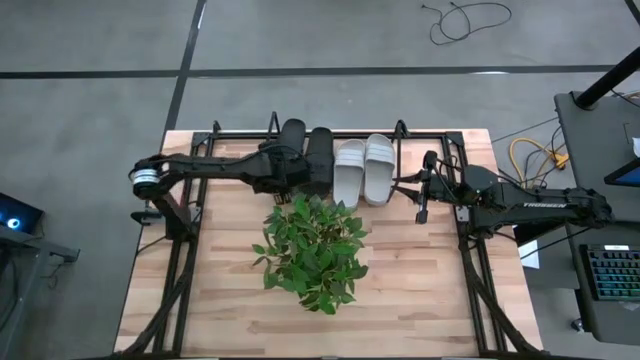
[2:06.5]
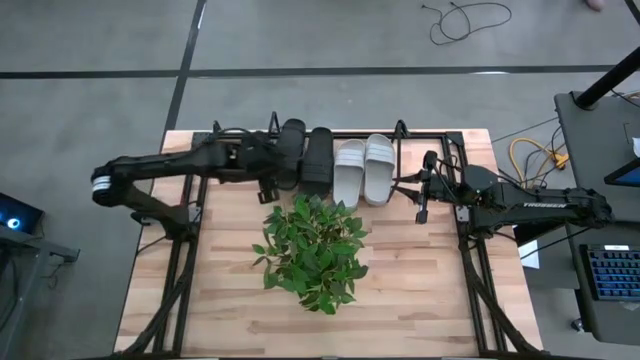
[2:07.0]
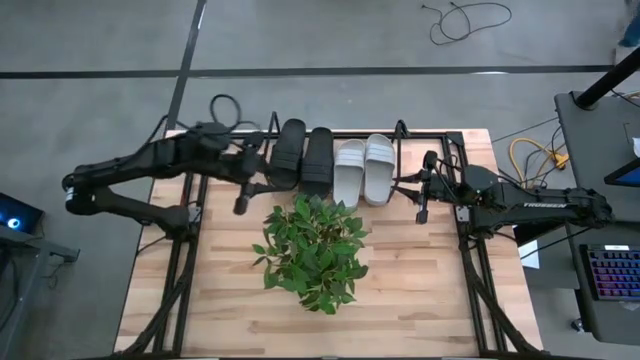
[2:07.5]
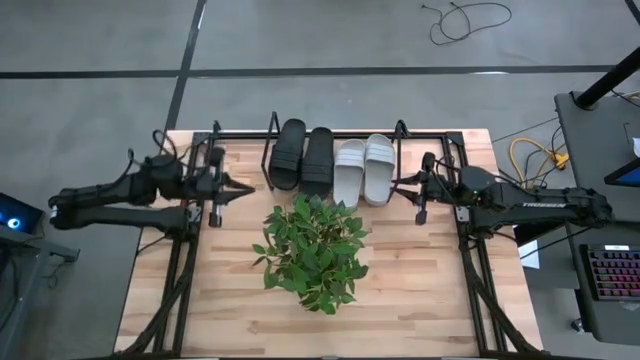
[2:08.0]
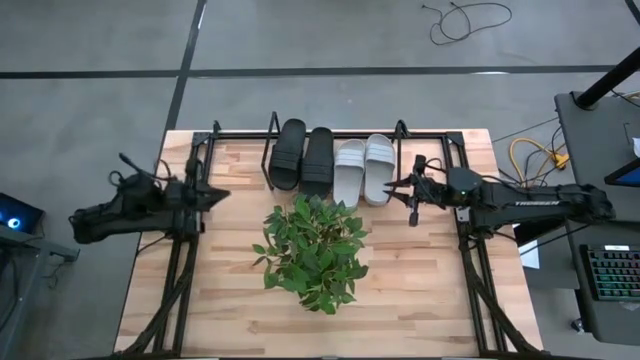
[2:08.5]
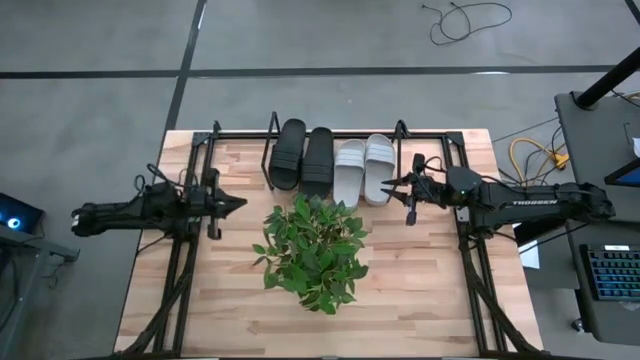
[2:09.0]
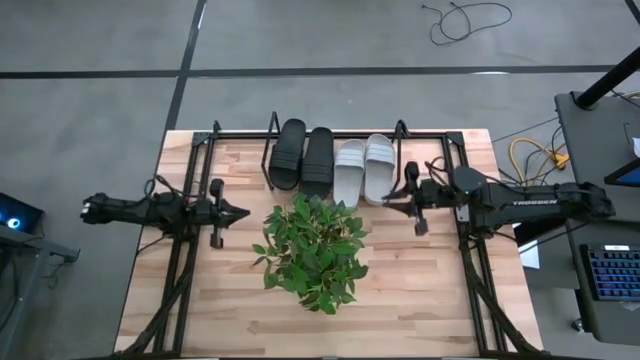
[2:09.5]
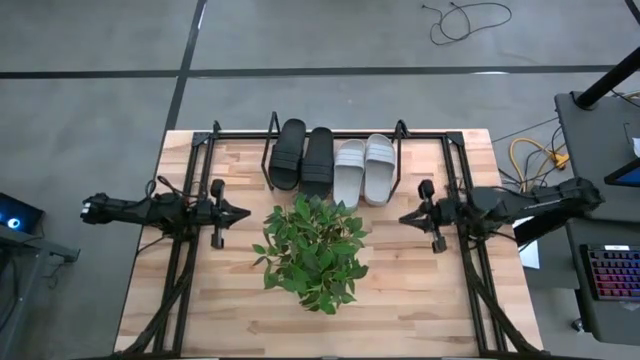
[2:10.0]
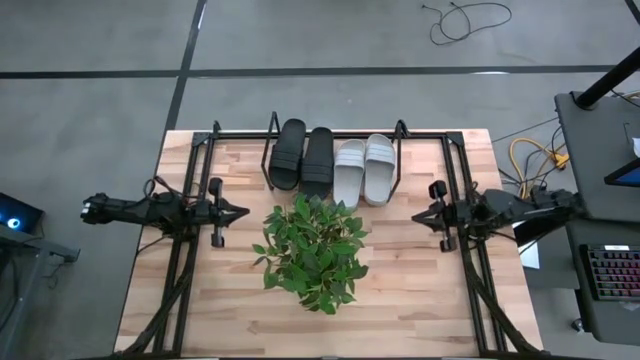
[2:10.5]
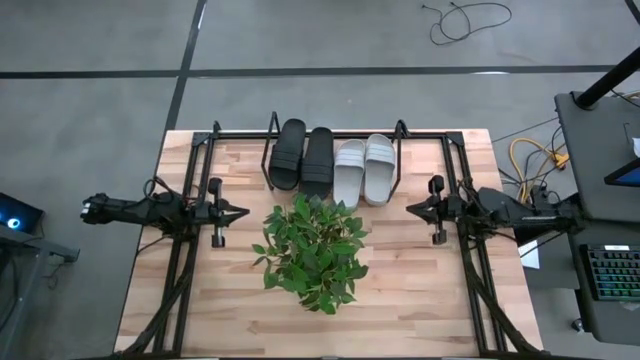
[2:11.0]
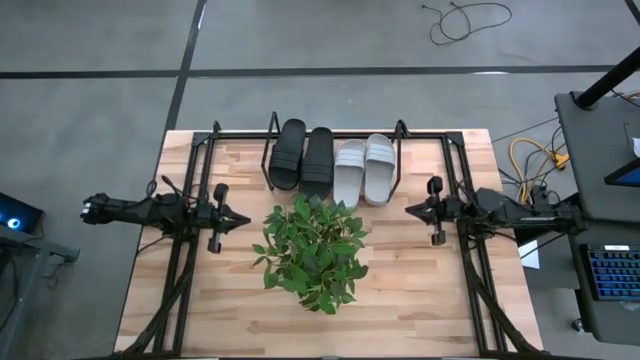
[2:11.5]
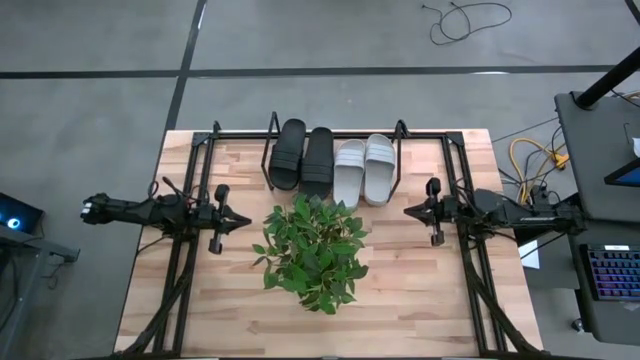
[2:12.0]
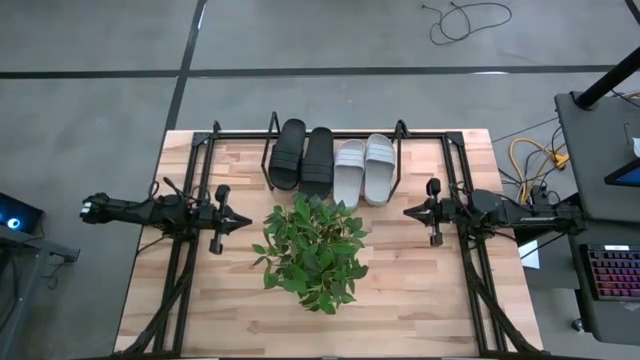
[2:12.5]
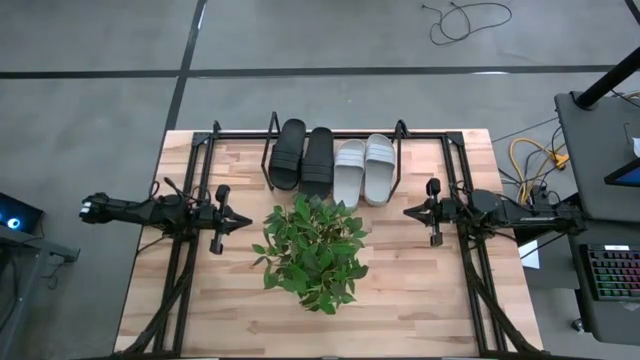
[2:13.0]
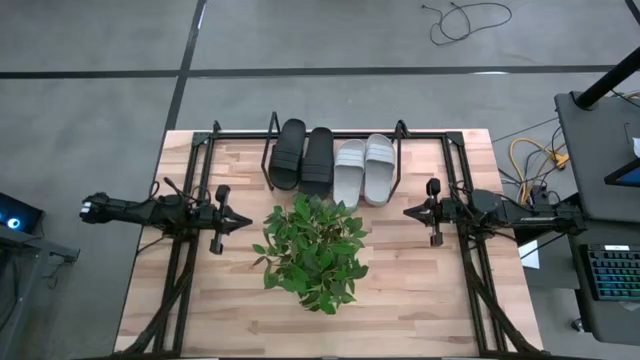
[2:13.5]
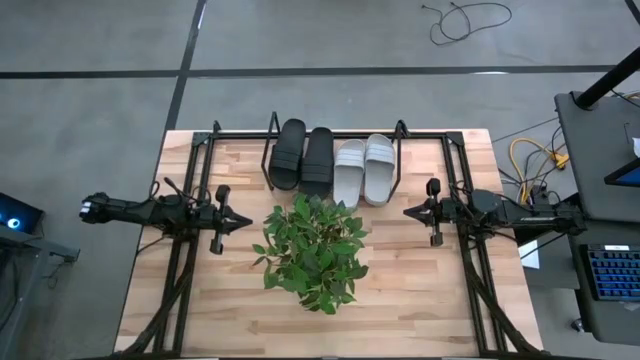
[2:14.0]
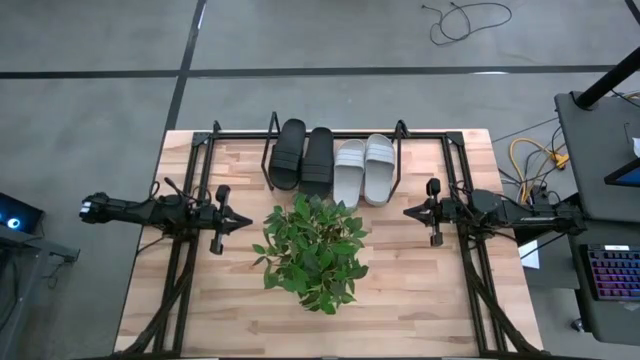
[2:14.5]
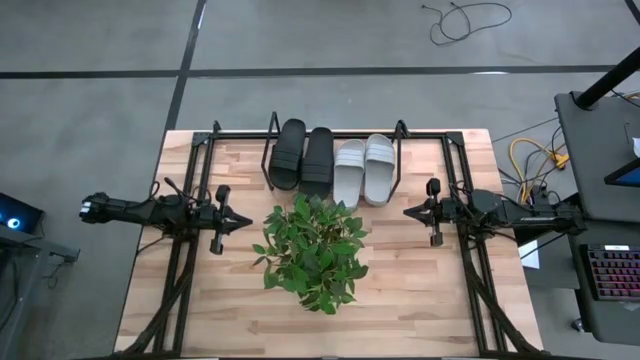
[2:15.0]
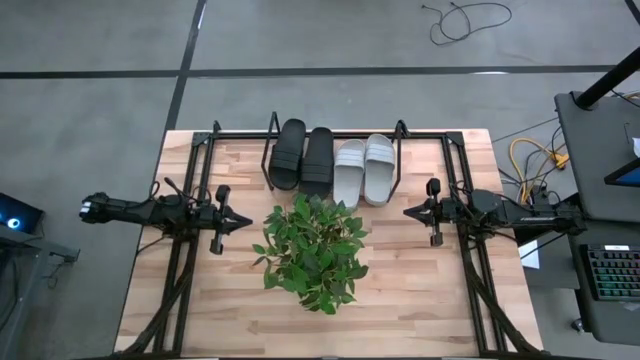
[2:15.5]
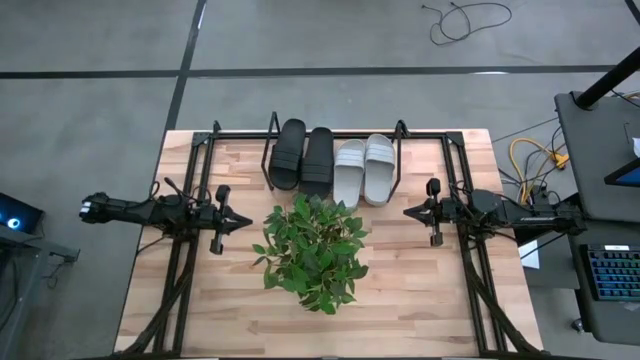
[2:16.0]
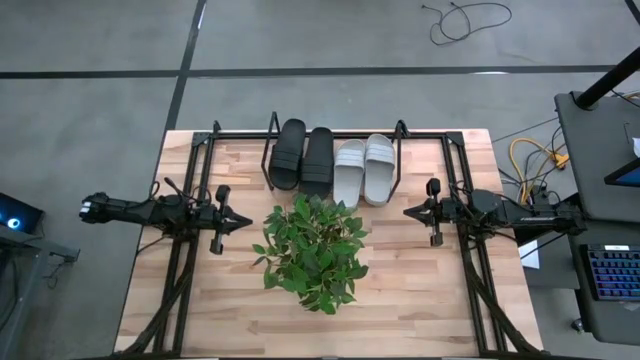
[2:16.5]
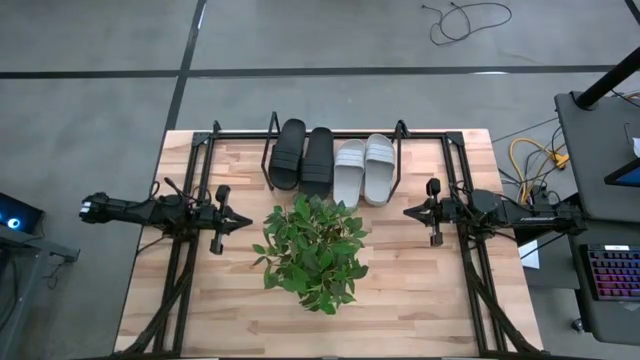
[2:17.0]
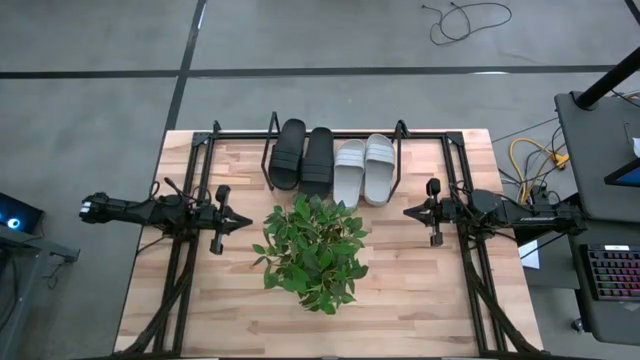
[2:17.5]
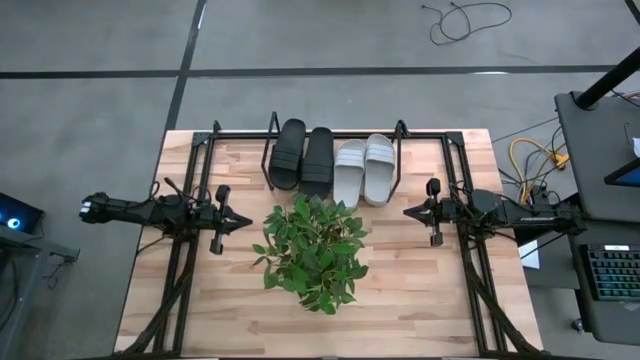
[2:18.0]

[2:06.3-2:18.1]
Task: Pick and place slides into the shelf
Return to Home Position

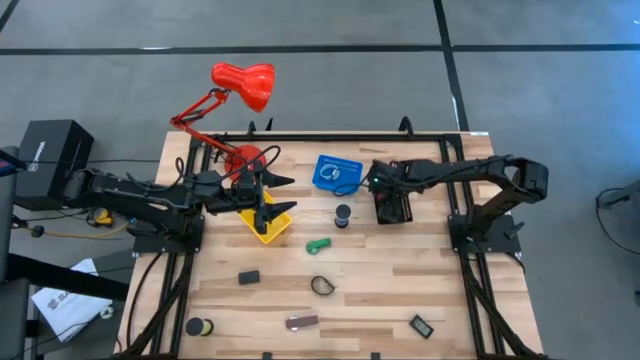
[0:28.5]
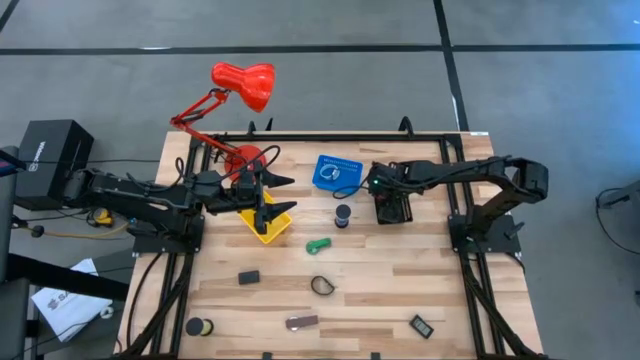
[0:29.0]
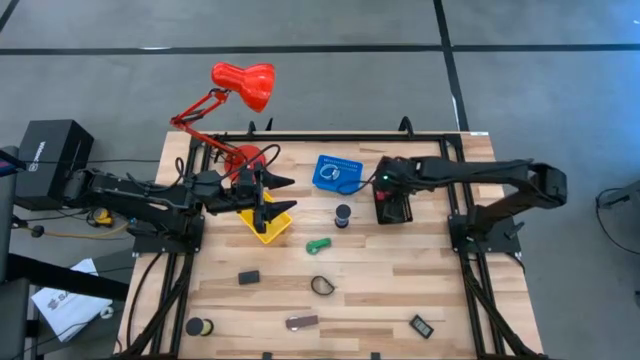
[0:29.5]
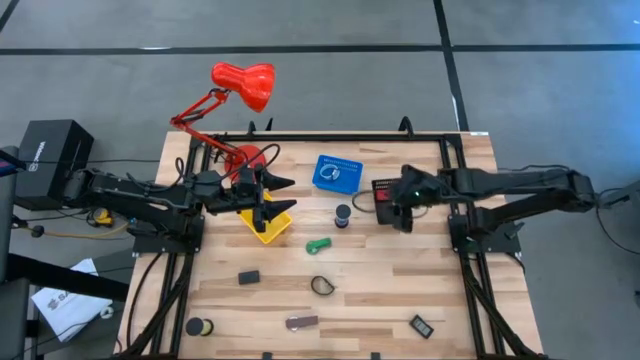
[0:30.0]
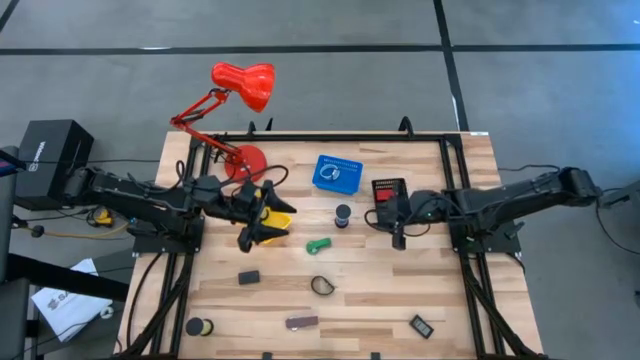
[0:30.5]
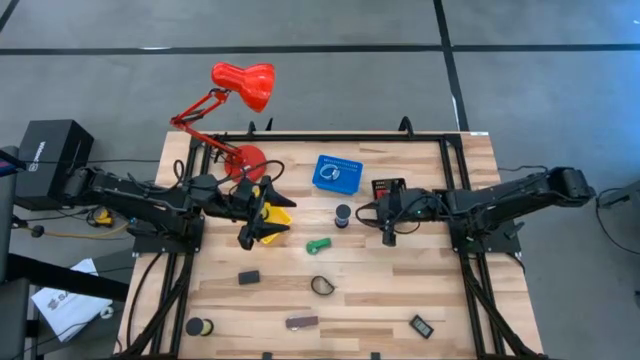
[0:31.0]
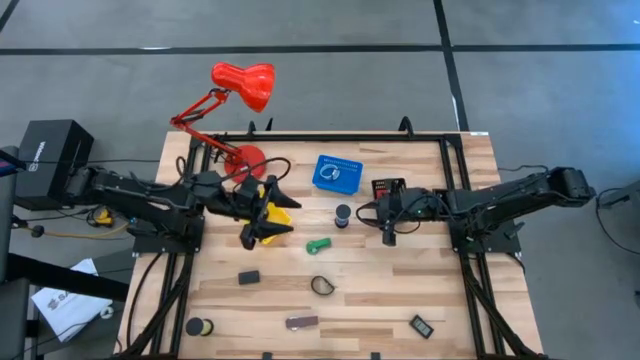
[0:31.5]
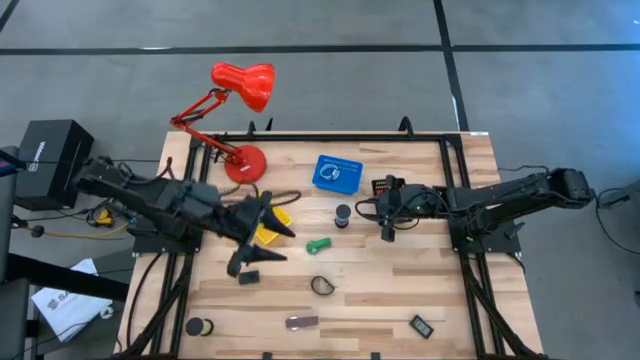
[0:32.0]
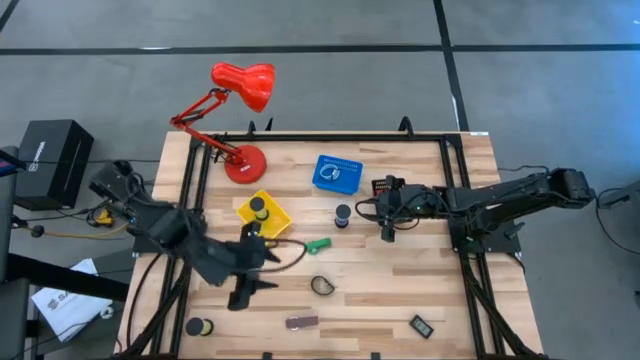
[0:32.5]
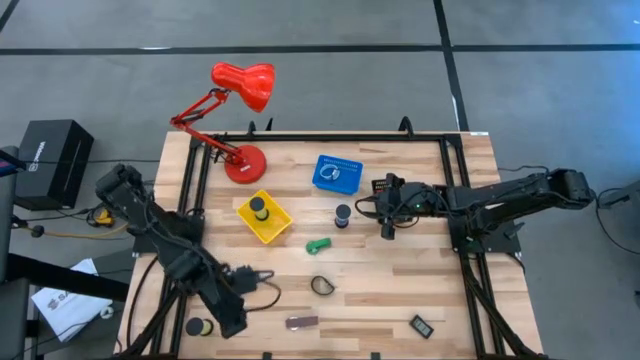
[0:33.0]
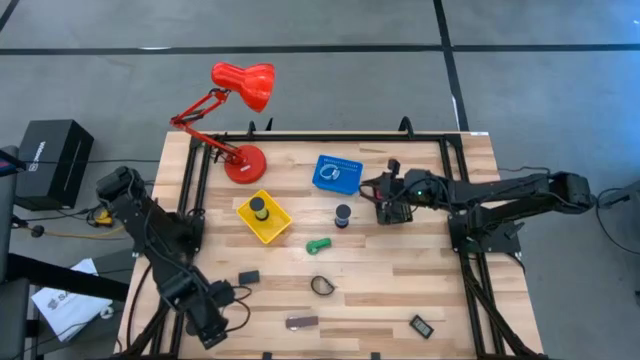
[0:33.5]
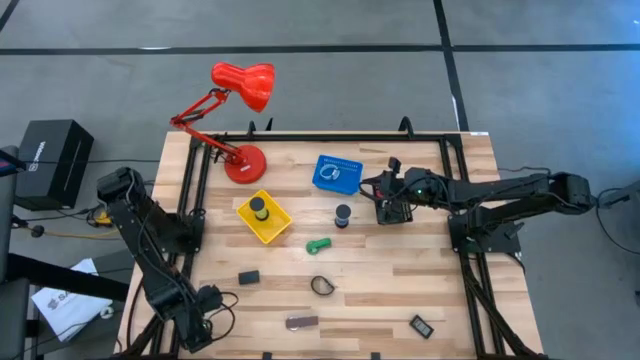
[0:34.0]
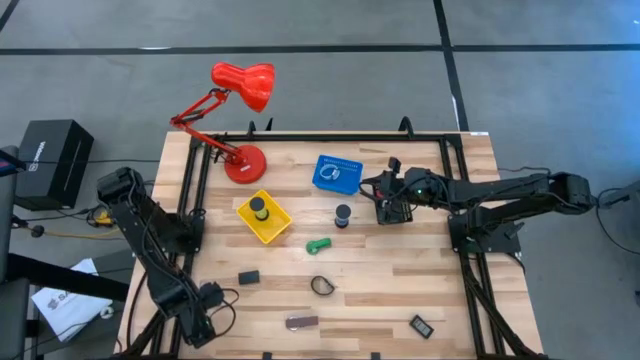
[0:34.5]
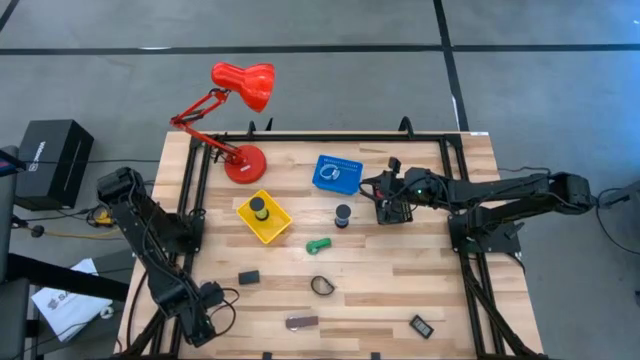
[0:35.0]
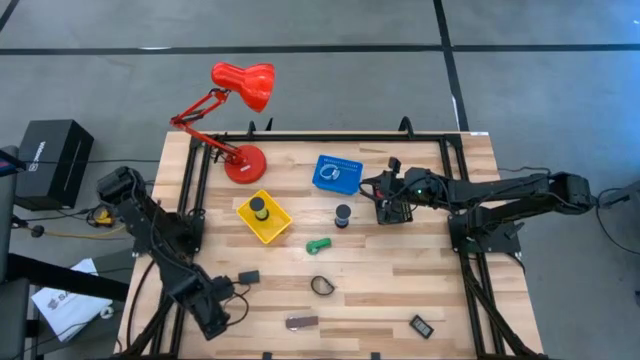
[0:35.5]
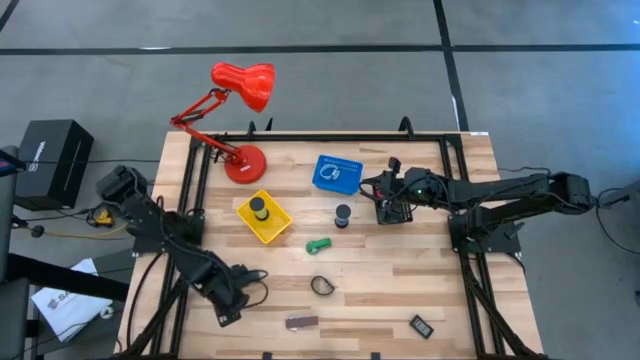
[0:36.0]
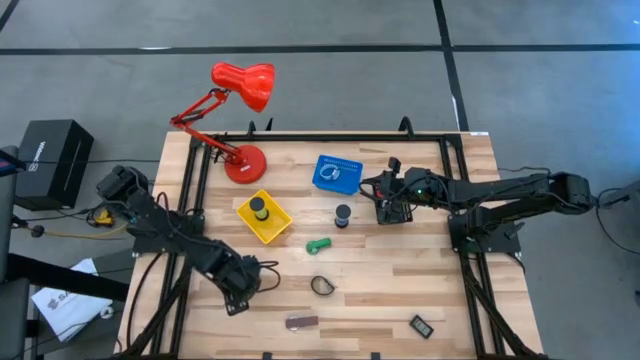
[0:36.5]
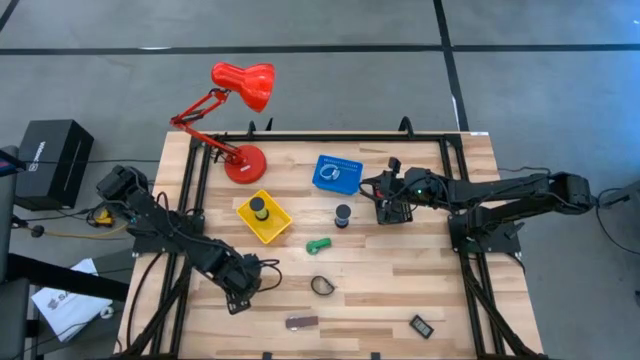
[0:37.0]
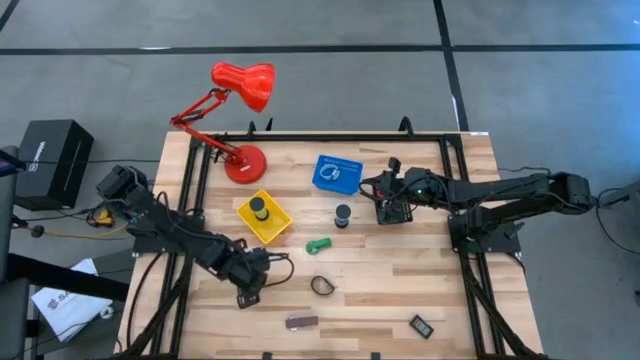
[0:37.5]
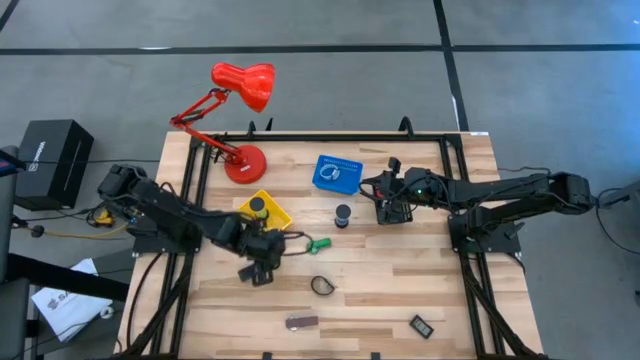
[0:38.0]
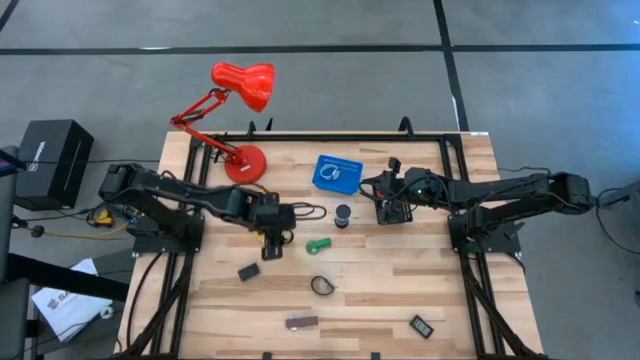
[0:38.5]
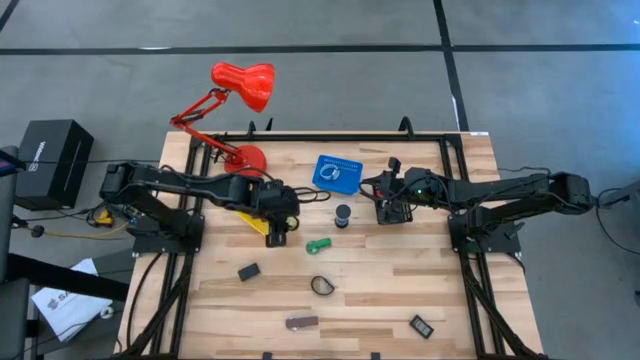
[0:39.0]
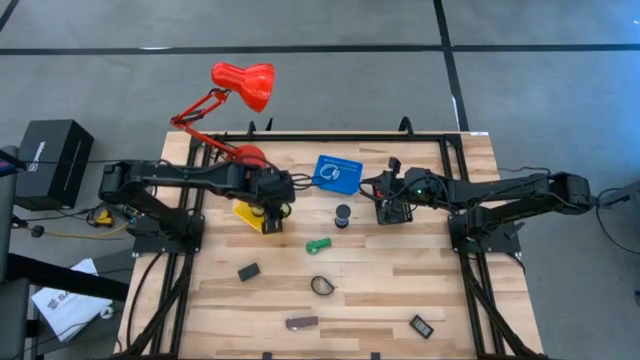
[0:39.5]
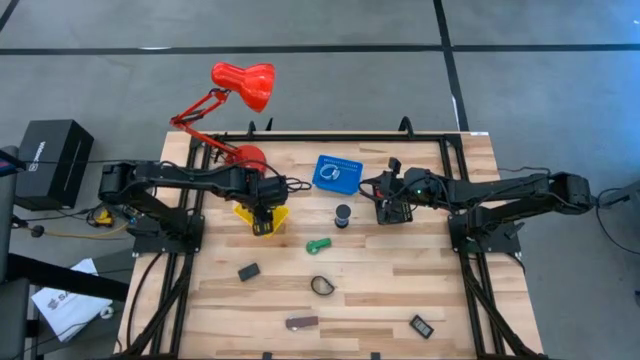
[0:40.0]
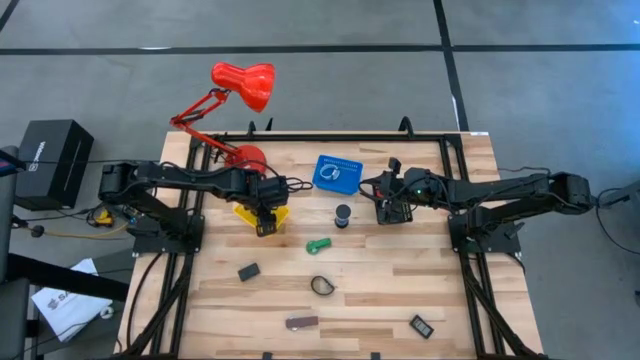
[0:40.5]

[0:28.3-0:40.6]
Task: Pick & Place Office items
Put the green hourglass into the yellow bin
